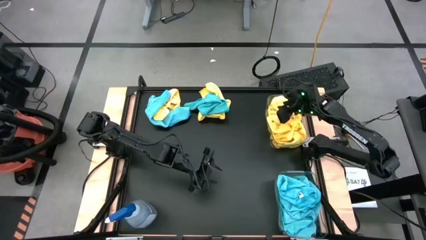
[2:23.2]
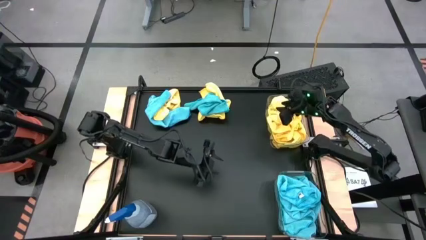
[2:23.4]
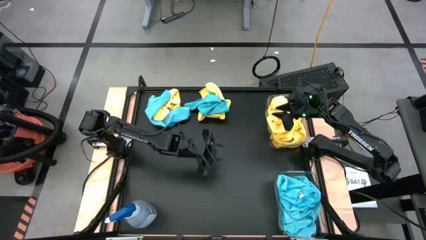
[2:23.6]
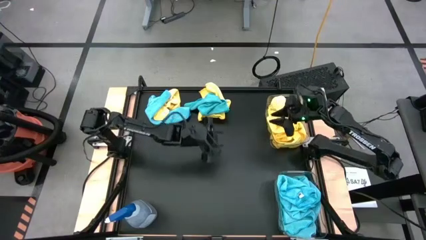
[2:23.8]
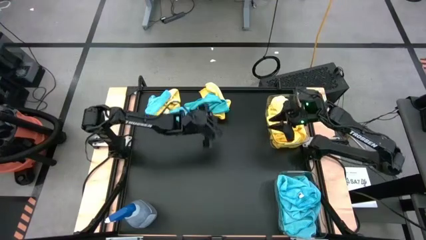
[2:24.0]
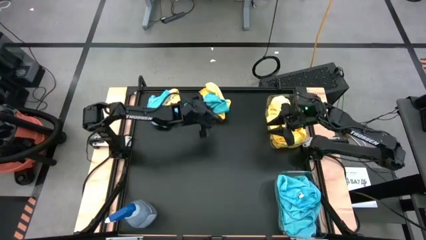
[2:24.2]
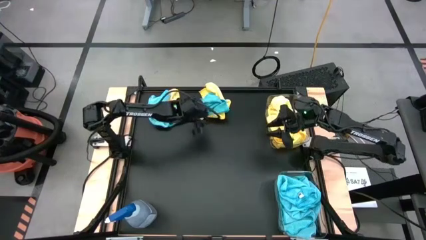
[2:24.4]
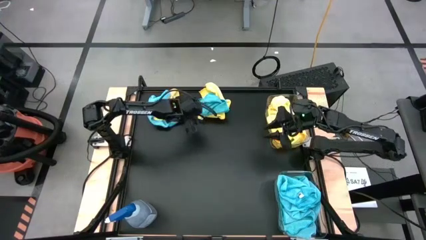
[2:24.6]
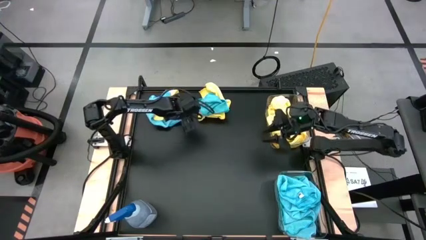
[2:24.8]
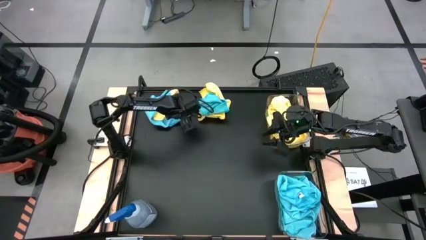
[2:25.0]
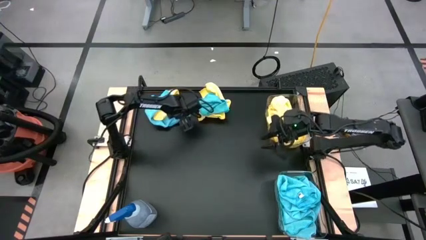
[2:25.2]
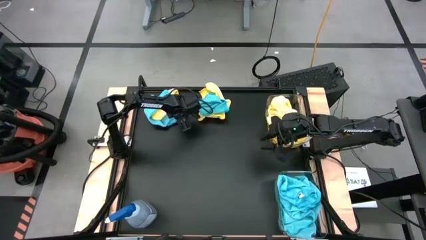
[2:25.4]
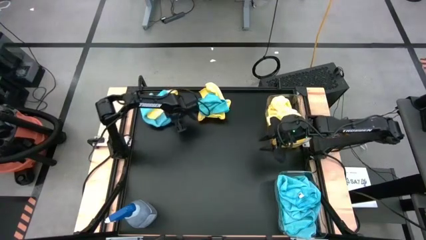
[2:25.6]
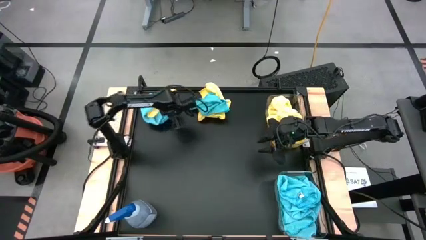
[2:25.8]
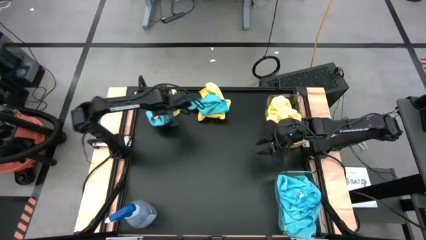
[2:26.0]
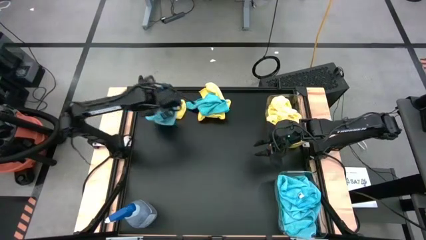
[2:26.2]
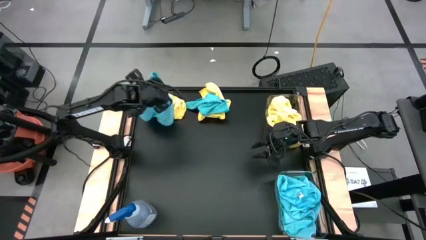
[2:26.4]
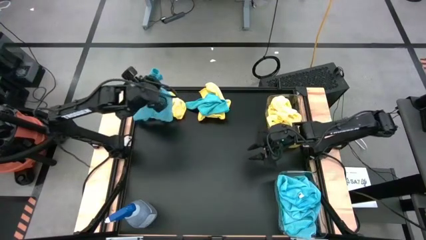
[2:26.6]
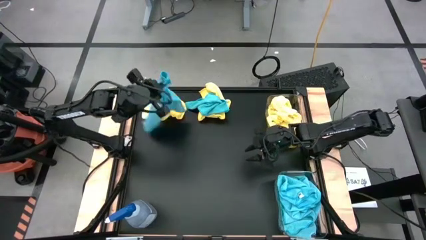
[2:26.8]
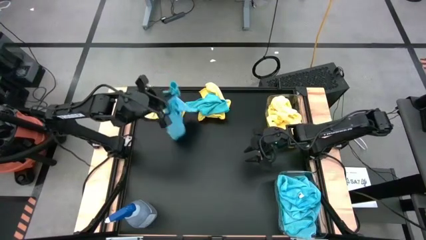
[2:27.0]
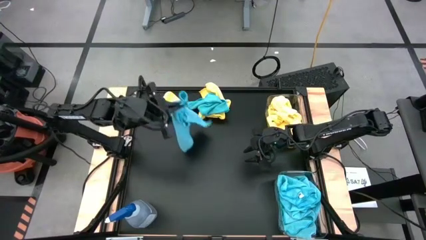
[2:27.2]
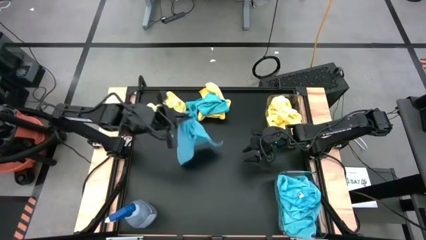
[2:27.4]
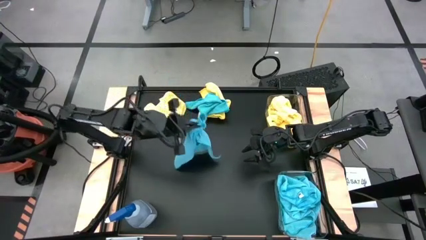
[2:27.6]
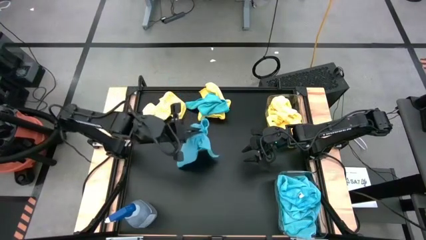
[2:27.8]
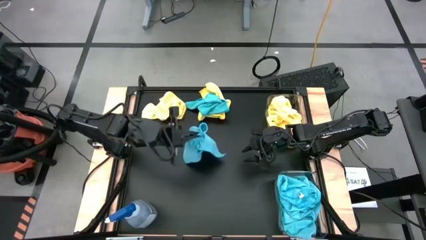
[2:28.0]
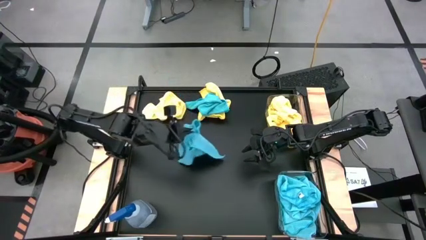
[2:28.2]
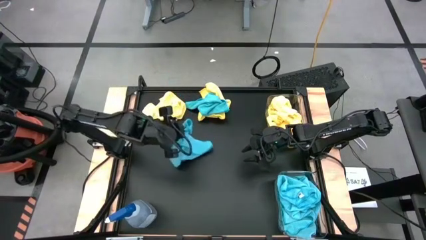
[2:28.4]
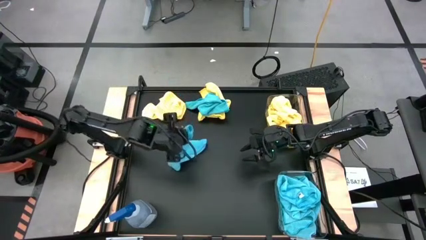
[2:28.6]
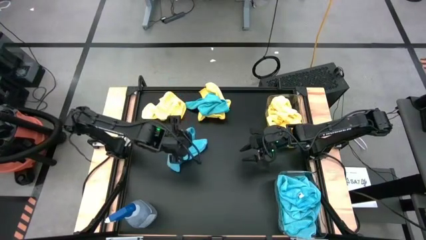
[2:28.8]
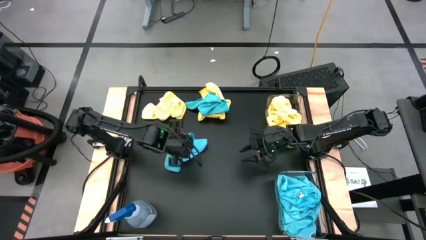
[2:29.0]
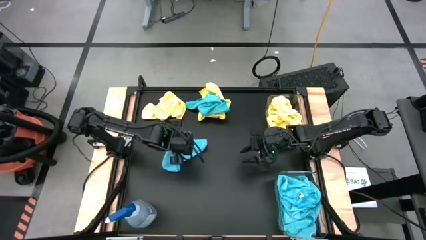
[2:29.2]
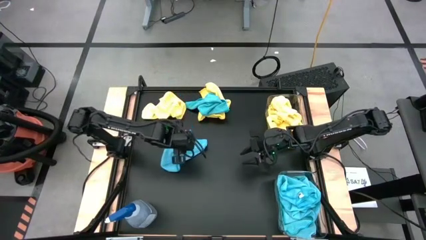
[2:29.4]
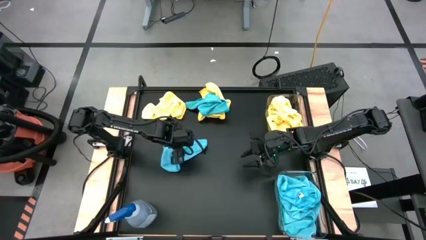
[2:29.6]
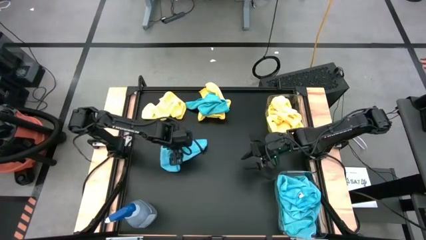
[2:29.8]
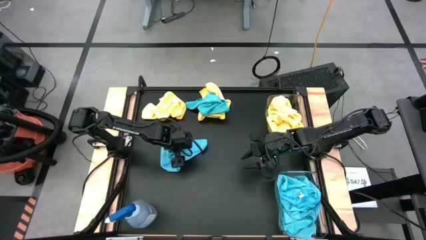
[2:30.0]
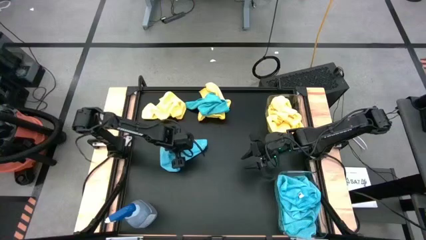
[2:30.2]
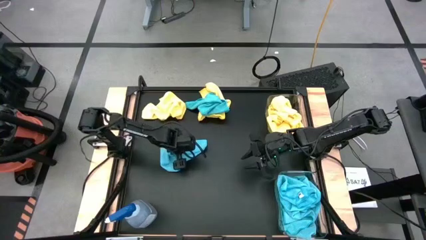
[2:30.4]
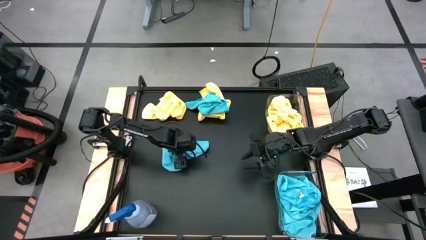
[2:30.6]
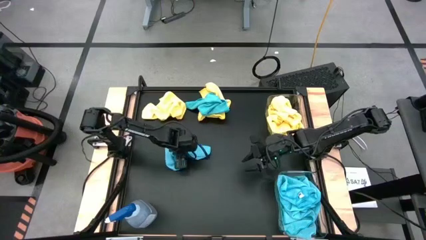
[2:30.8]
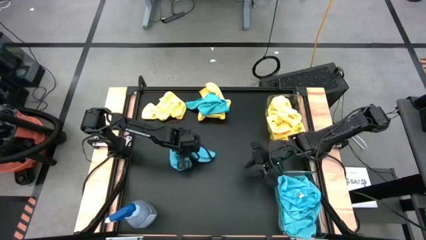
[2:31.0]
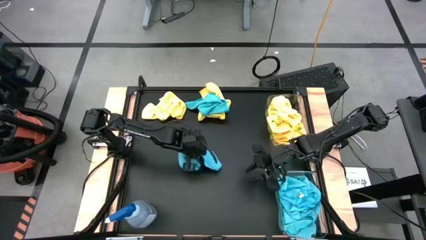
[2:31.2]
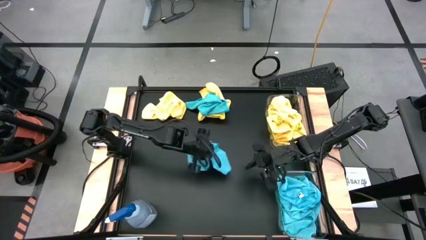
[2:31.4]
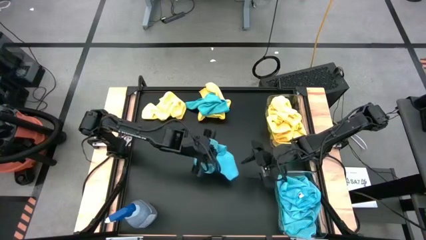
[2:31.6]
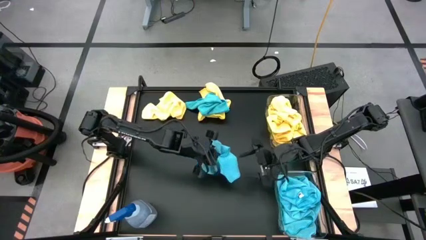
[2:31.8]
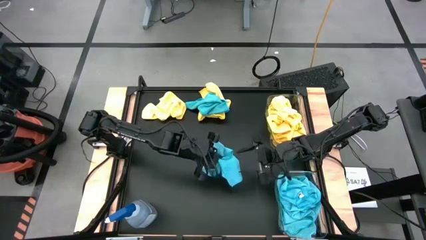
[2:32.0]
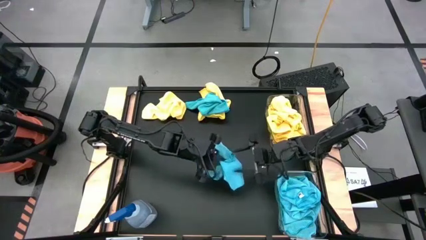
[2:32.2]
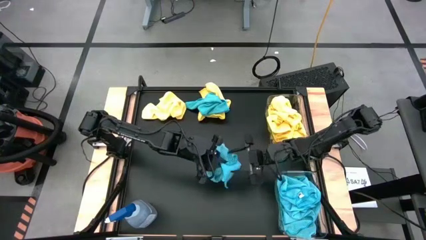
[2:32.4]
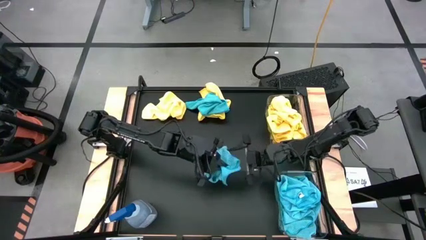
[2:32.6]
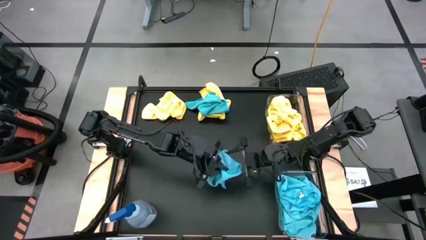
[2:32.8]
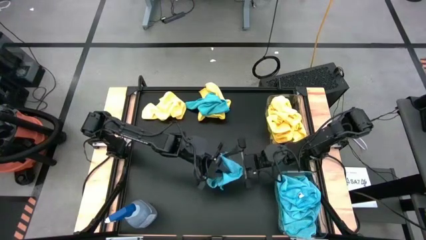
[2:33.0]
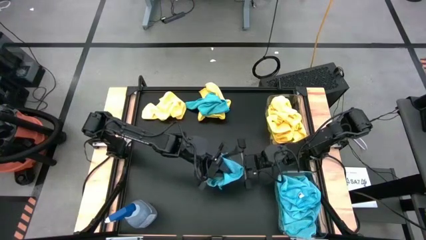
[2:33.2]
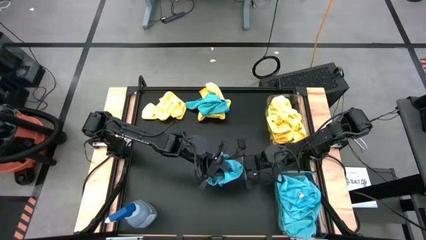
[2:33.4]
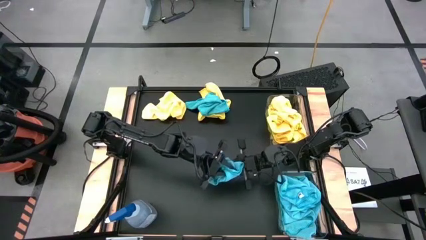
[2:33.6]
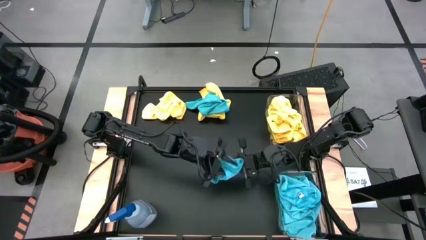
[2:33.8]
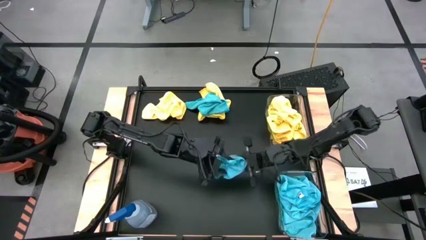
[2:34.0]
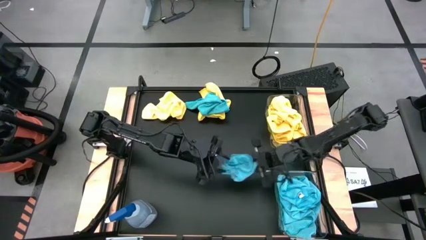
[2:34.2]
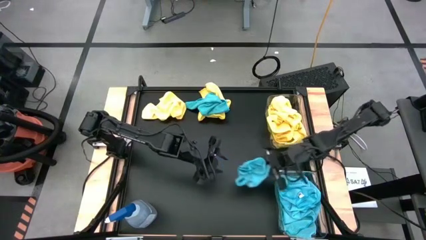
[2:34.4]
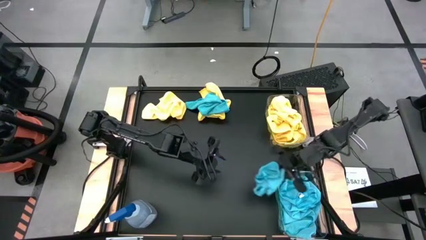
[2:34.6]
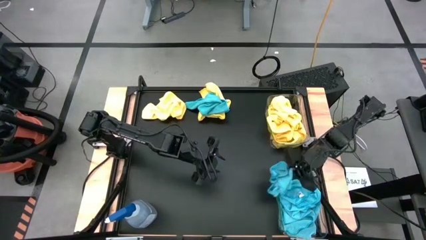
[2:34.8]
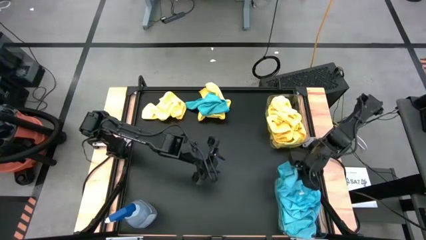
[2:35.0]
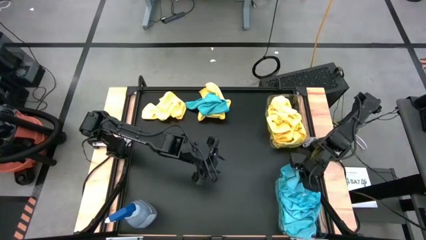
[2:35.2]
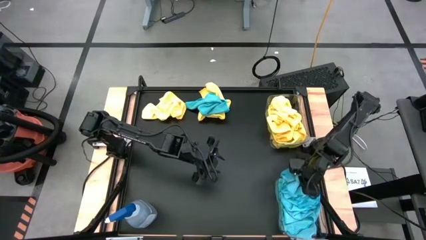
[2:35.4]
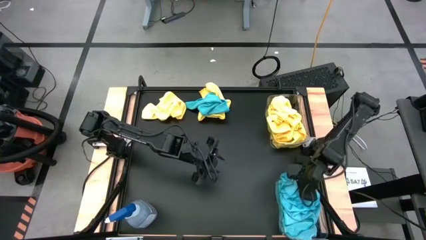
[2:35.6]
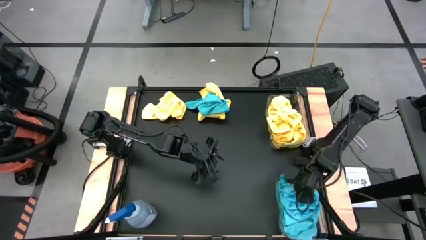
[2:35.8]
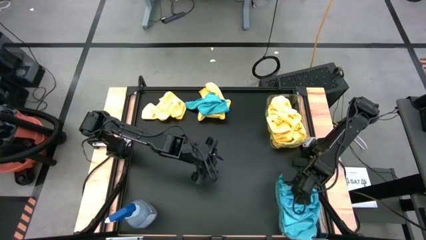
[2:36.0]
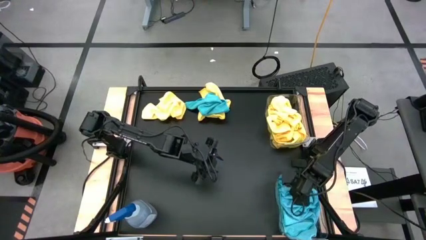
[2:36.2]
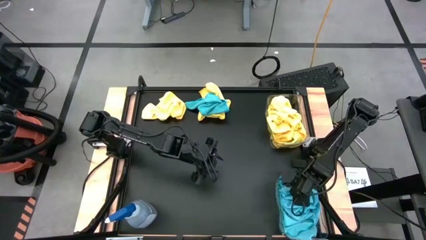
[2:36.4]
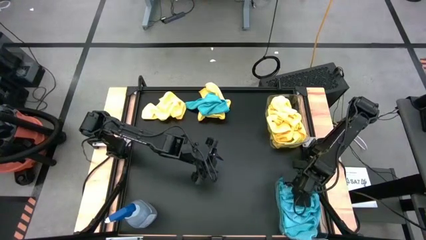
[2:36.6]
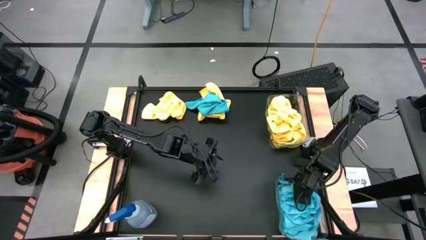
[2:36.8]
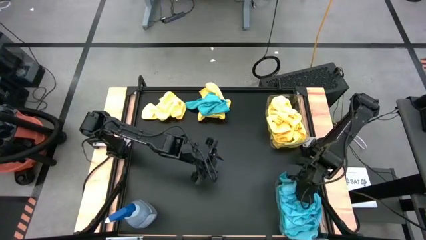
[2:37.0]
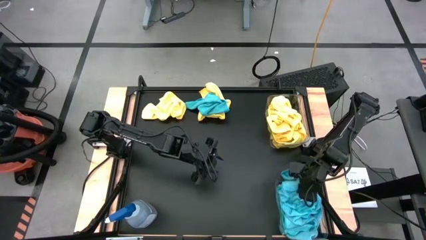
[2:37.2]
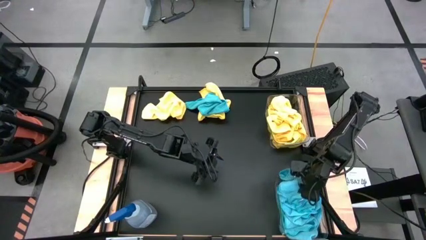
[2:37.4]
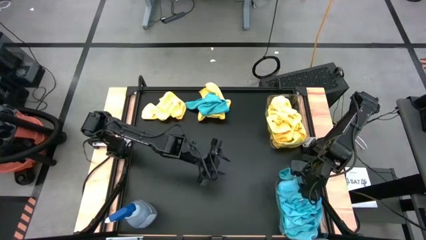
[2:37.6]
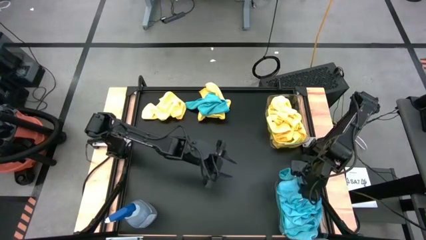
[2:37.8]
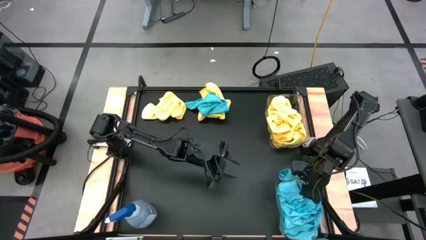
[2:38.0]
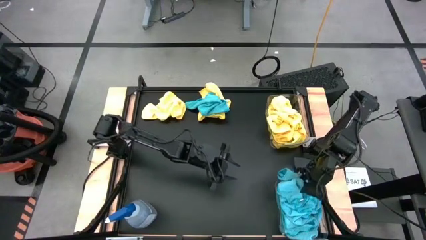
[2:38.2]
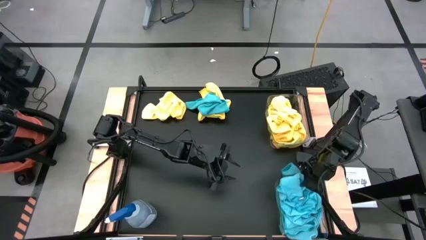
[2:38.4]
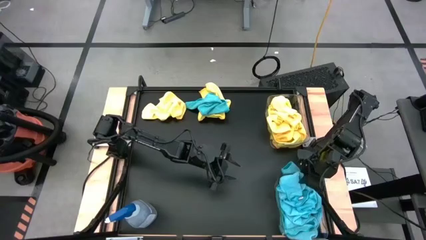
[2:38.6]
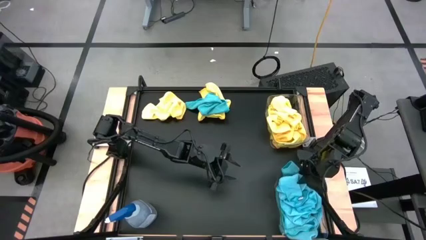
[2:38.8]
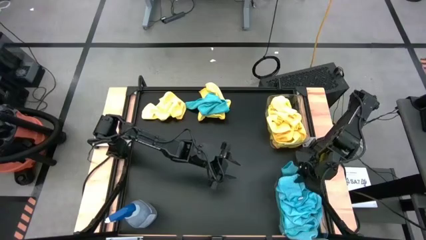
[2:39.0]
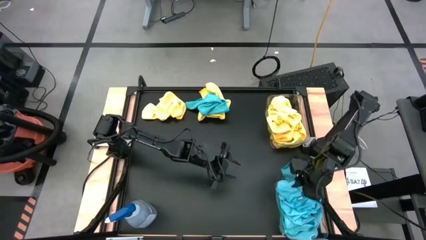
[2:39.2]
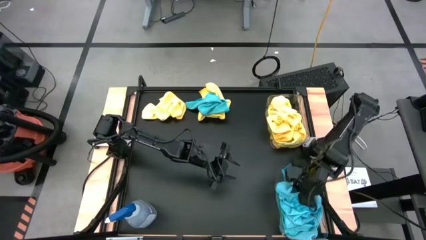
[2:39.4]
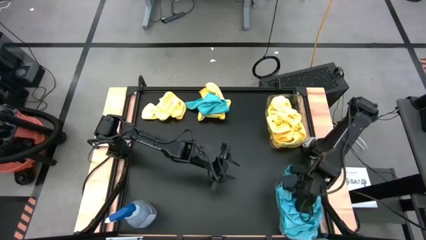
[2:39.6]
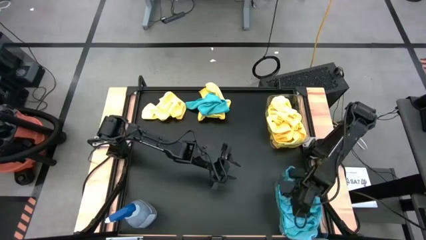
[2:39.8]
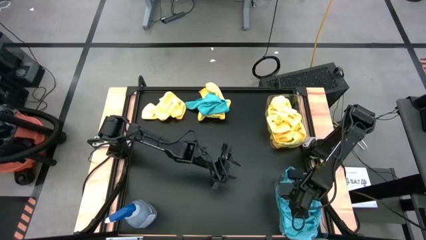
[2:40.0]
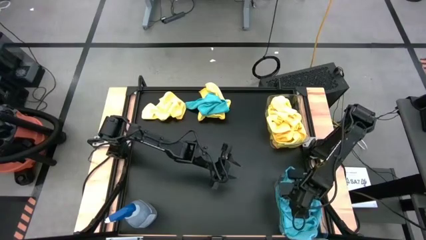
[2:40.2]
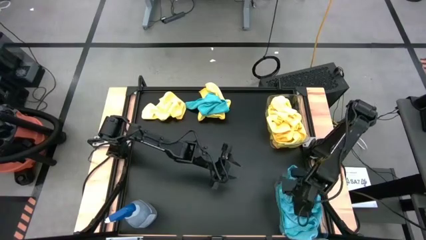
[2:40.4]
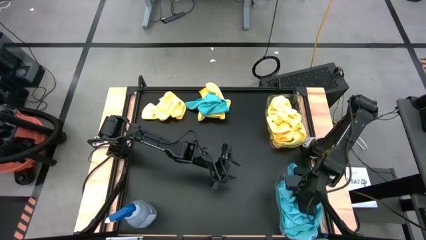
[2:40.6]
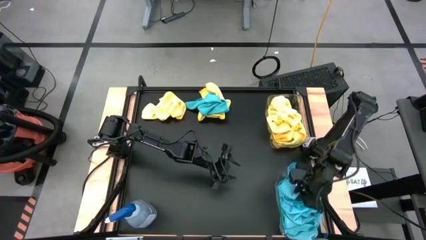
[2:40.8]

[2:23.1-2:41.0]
Task: Sort microfiber towel by color & place in baskets
Put the blue towel into the bottom transparent bin
